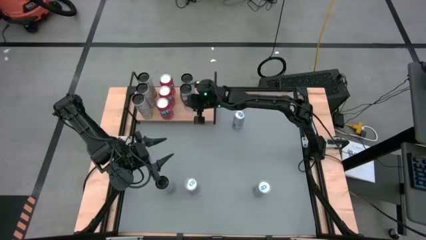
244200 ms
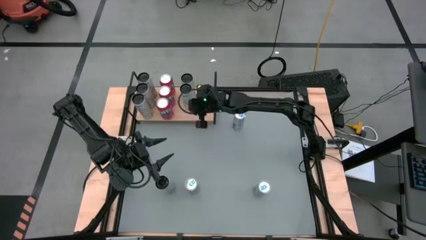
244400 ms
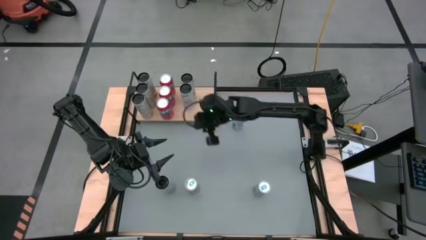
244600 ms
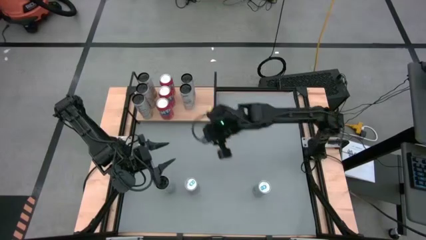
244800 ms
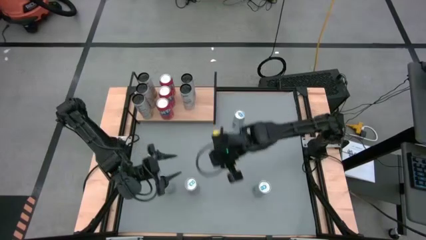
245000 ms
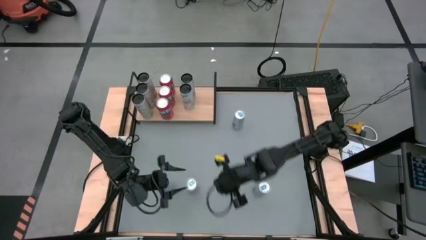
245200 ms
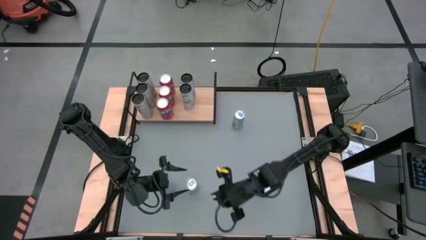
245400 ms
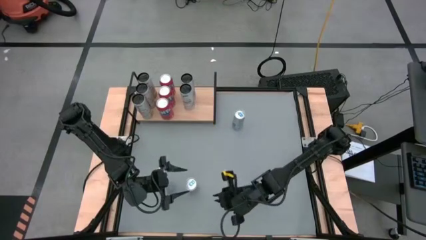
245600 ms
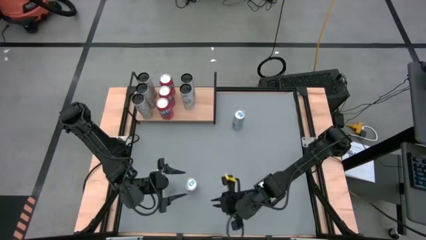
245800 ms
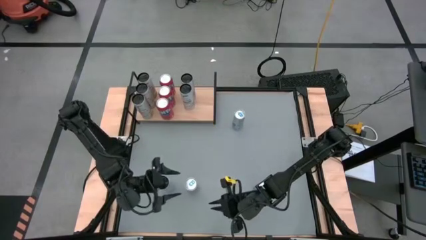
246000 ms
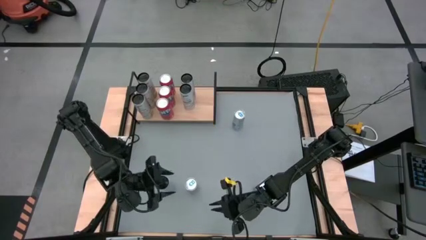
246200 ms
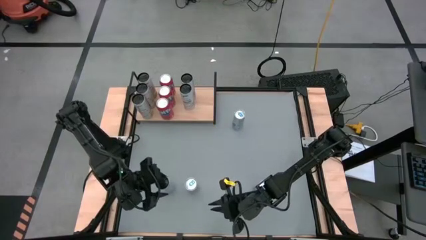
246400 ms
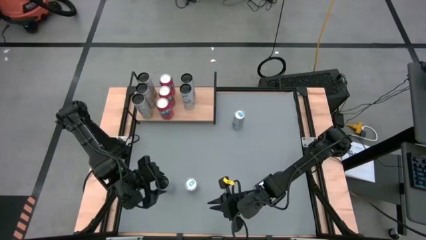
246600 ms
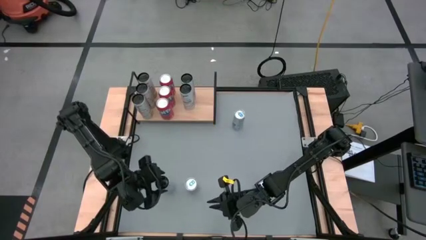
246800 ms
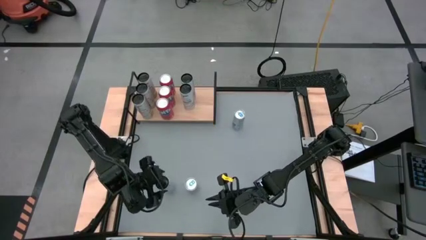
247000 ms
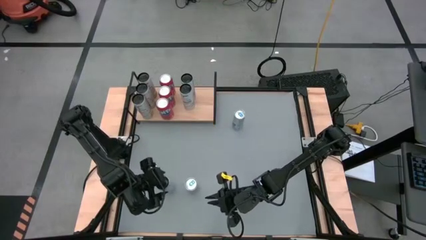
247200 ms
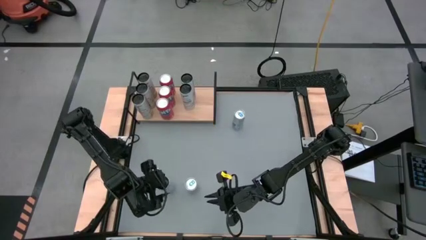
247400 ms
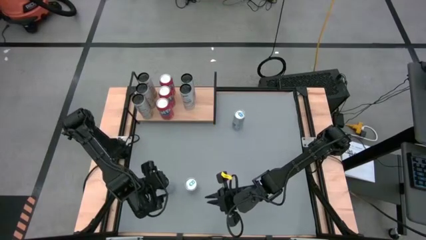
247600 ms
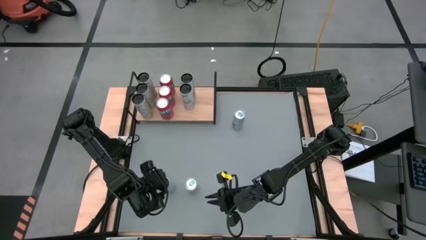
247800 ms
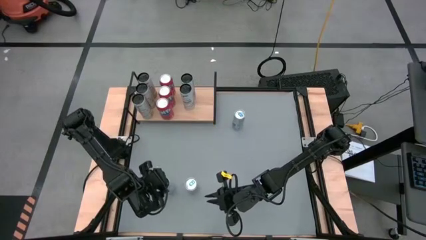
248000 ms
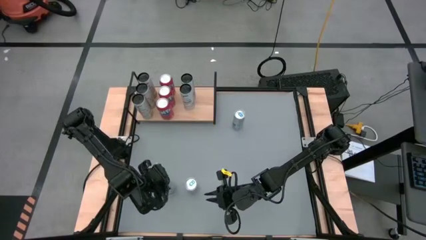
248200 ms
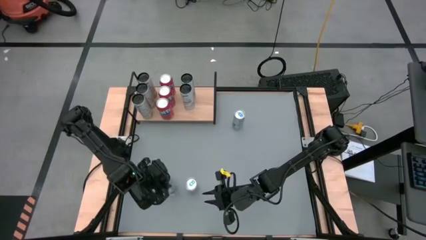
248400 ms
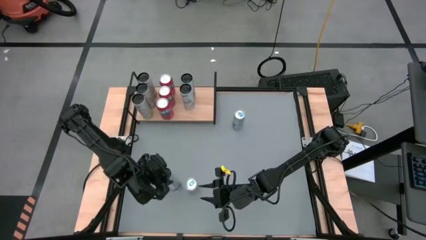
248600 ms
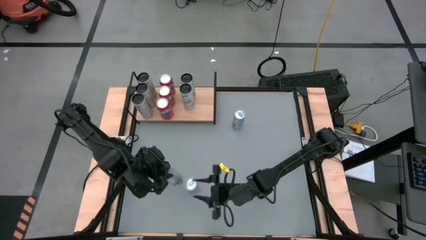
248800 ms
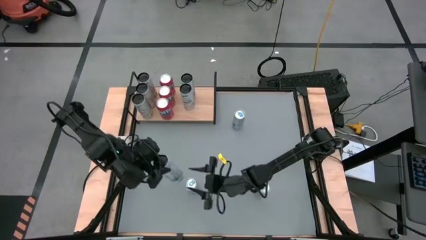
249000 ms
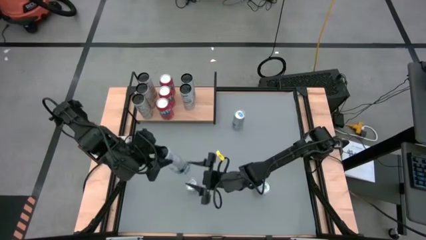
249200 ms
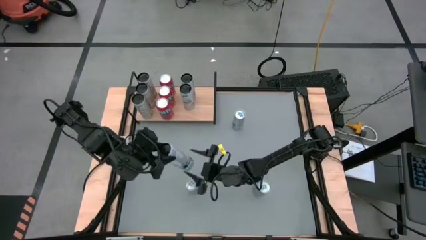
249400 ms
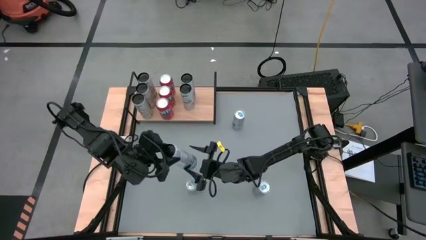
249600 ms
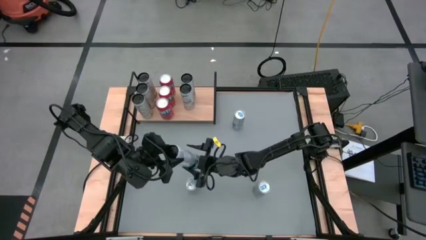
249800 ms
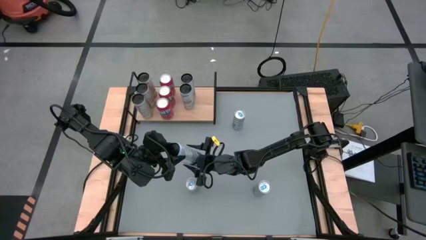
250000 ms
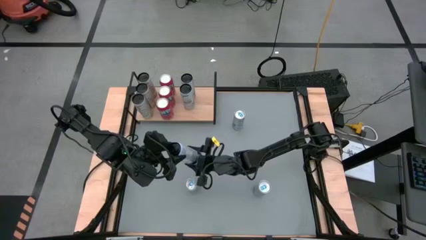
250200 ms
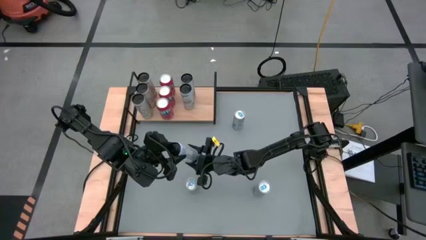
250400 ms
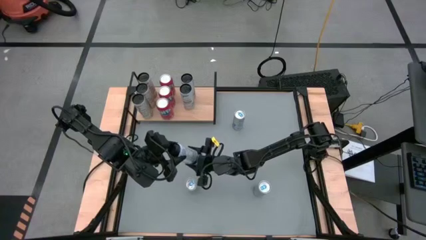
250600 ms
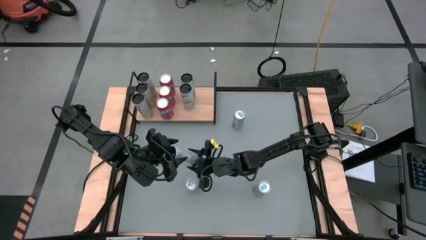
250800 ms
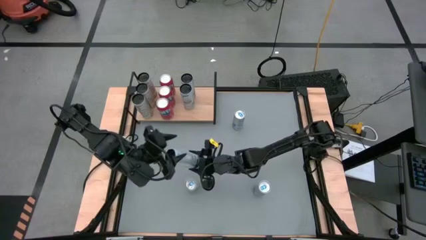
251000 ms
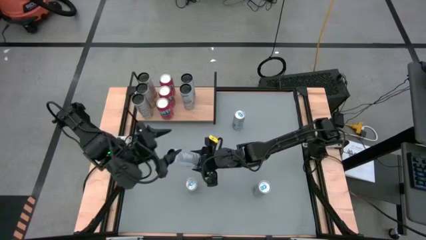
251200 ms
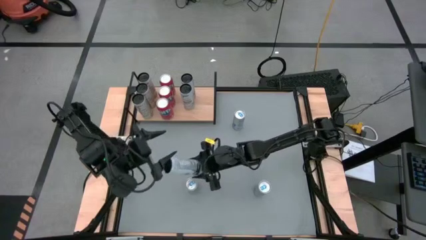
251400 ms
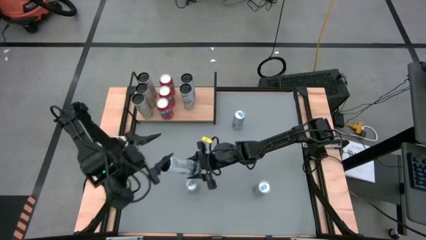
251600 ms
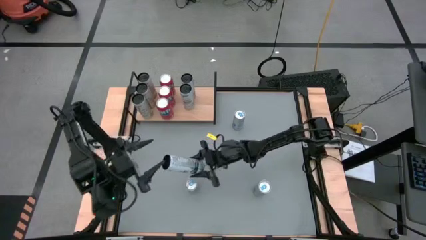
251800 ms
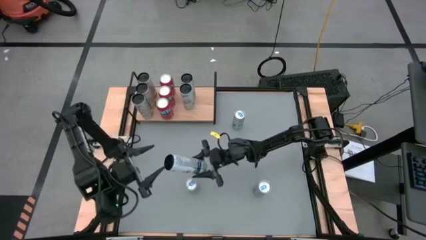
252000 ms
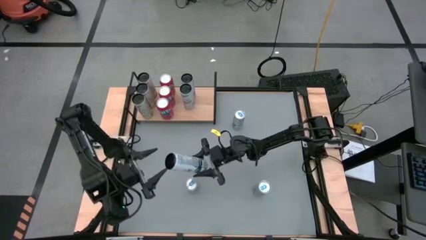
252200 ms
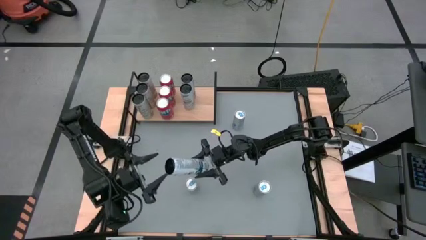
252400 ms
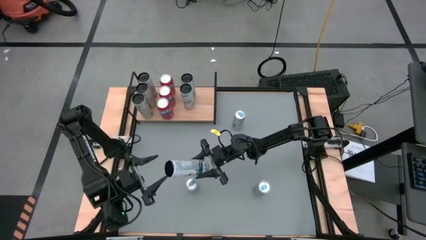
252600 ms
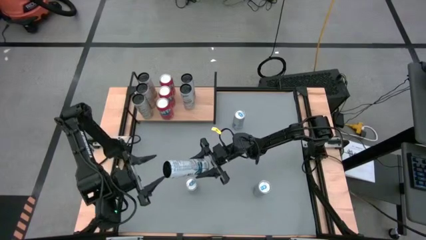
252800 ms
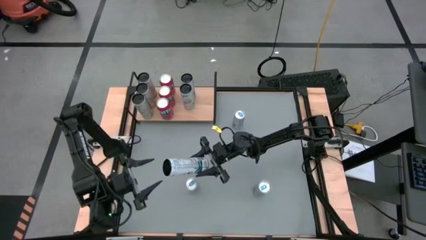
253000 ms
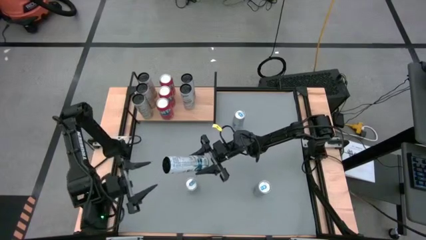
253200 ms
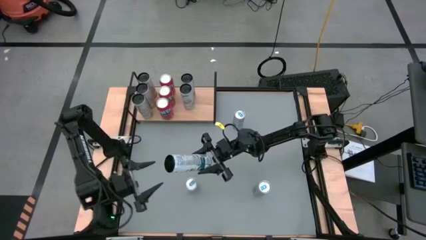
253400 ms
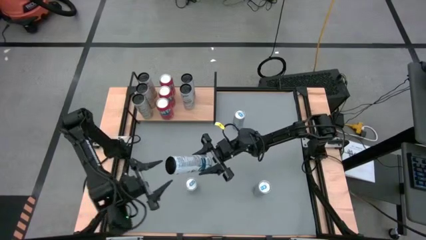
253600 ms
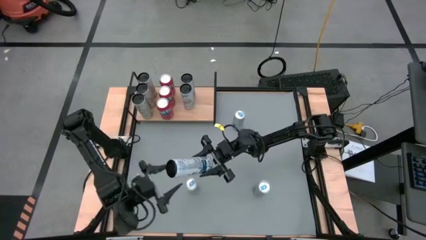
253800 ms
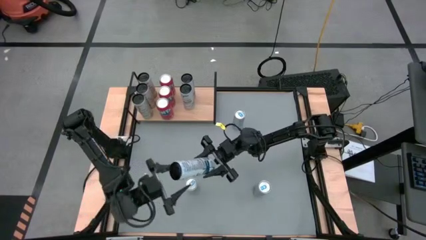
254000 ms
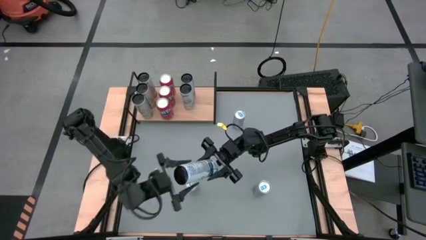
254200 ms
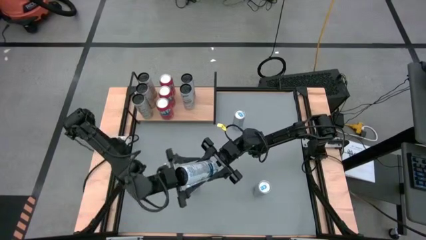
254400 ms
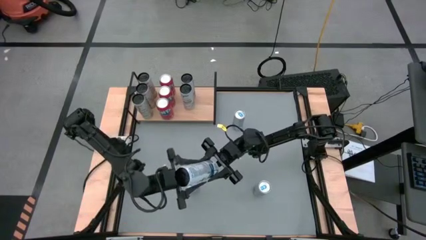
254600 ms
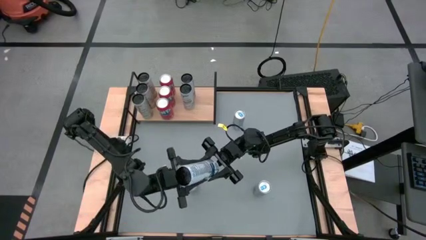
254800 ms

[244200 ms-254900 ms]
Task: Place canned beverage on shelf
Put the white-blue soda can on the shelf aligned with the other white-blue soda can
